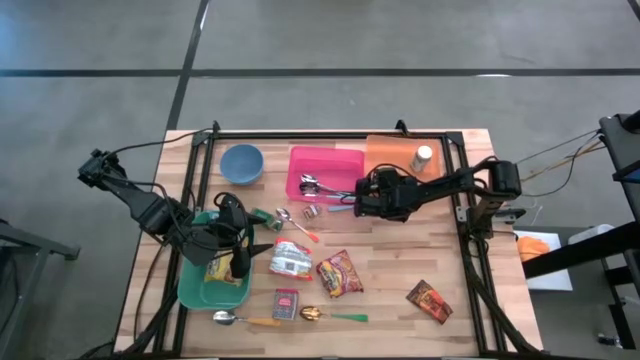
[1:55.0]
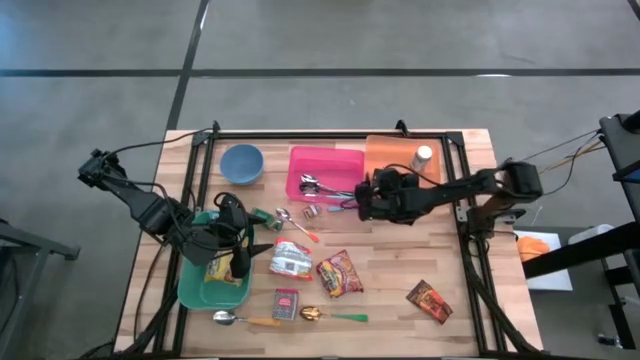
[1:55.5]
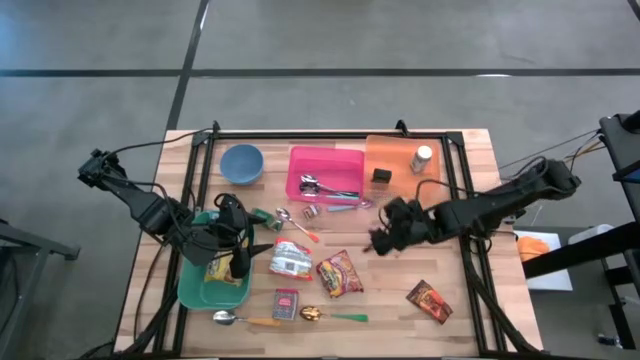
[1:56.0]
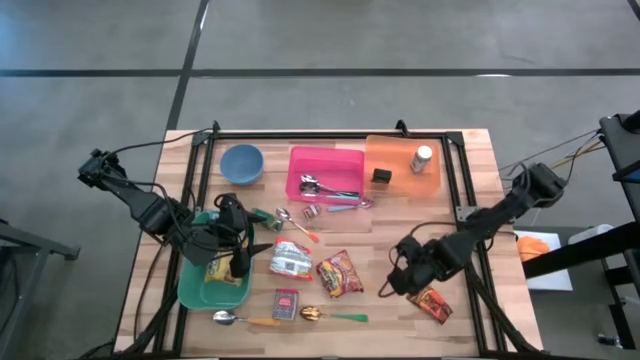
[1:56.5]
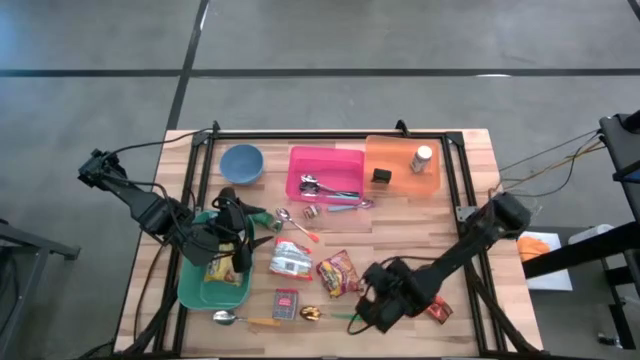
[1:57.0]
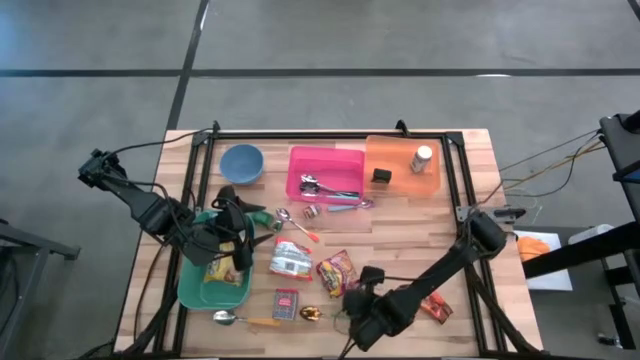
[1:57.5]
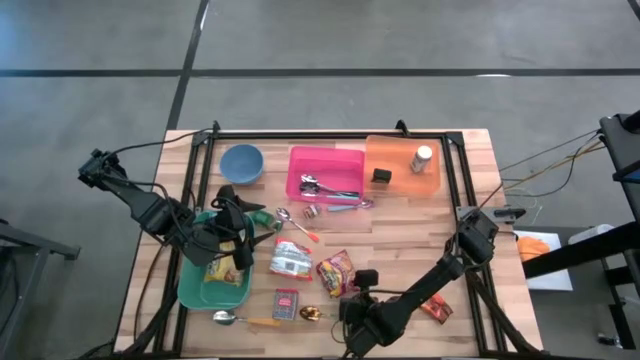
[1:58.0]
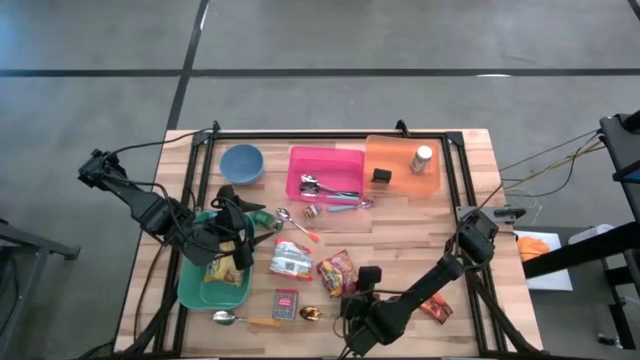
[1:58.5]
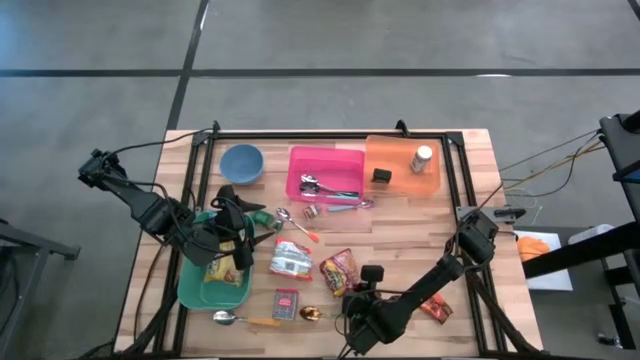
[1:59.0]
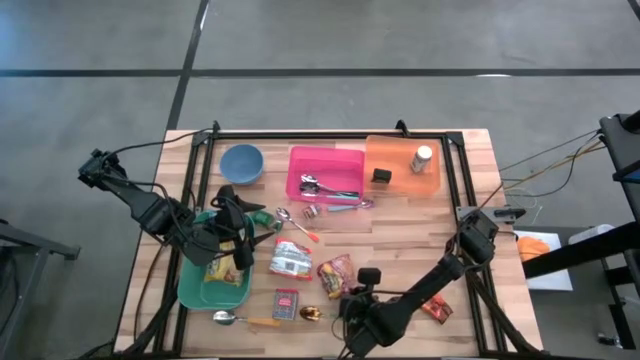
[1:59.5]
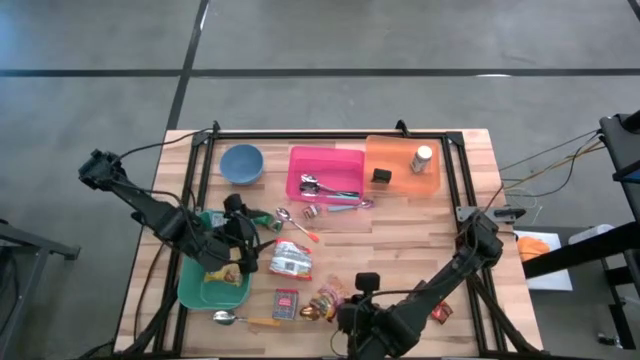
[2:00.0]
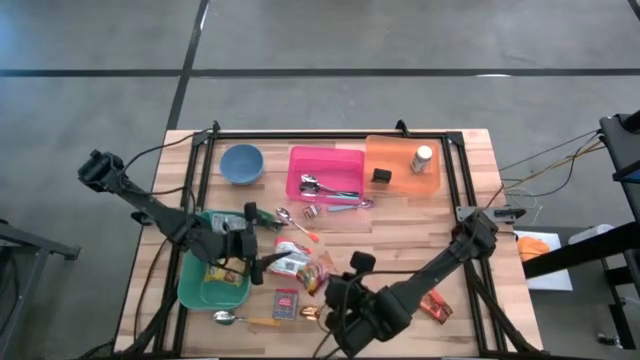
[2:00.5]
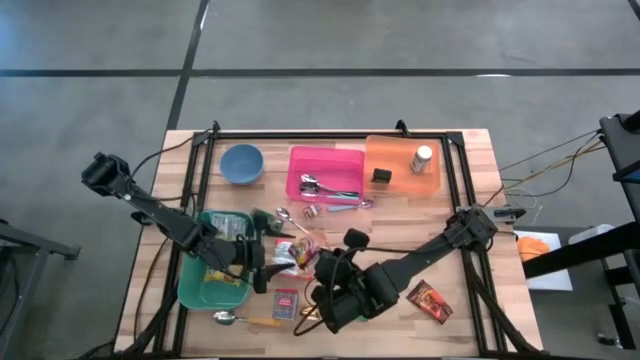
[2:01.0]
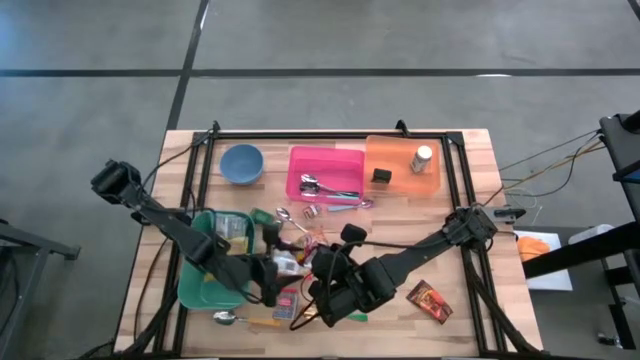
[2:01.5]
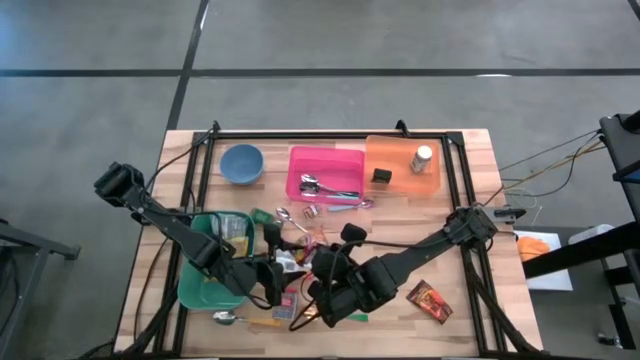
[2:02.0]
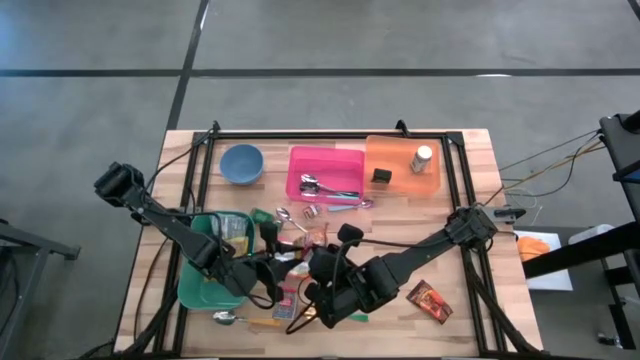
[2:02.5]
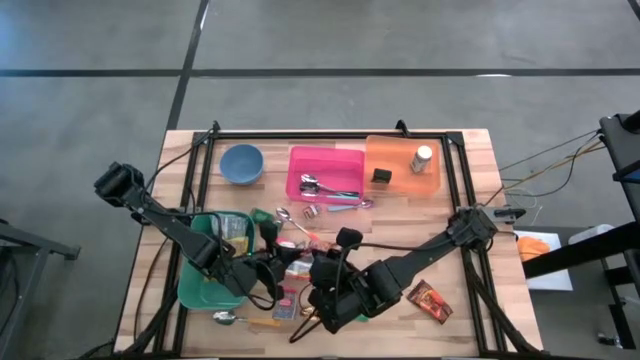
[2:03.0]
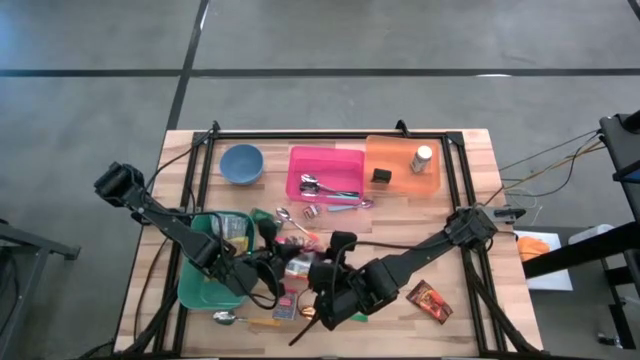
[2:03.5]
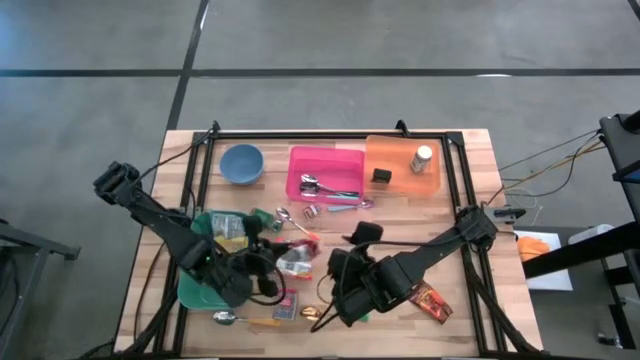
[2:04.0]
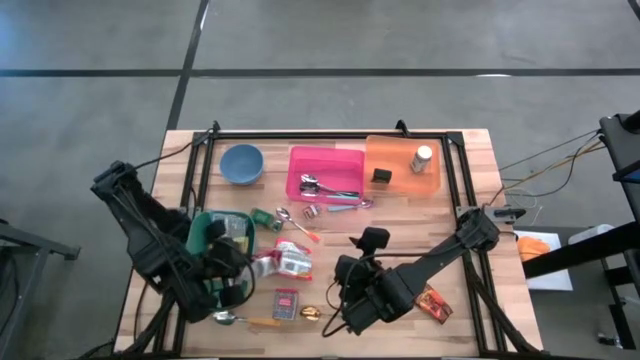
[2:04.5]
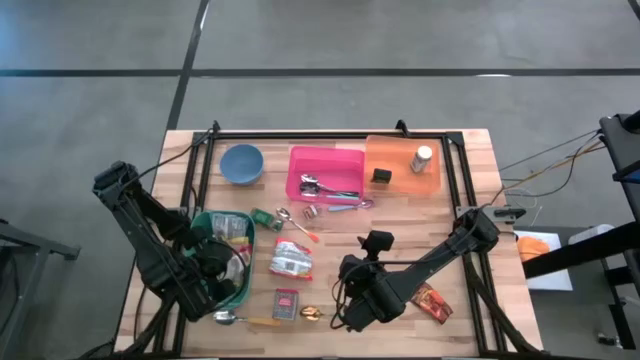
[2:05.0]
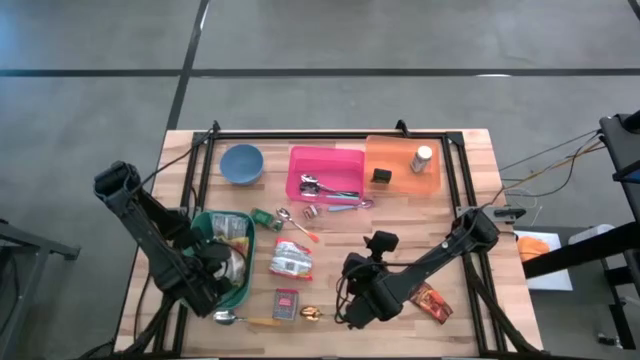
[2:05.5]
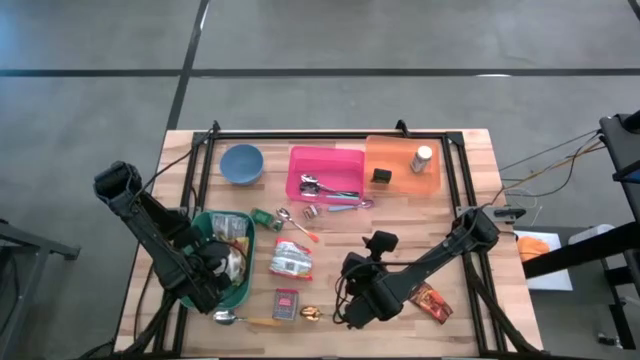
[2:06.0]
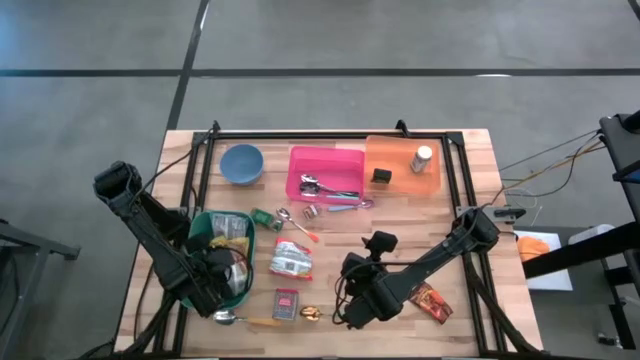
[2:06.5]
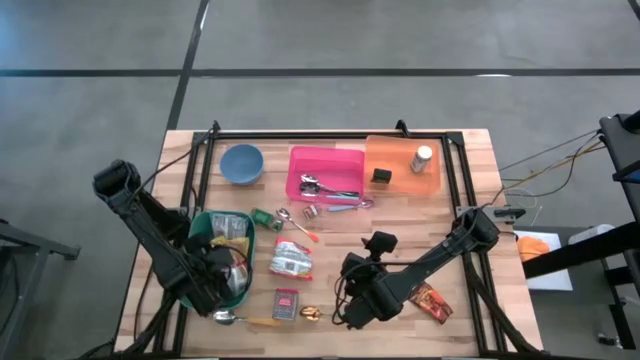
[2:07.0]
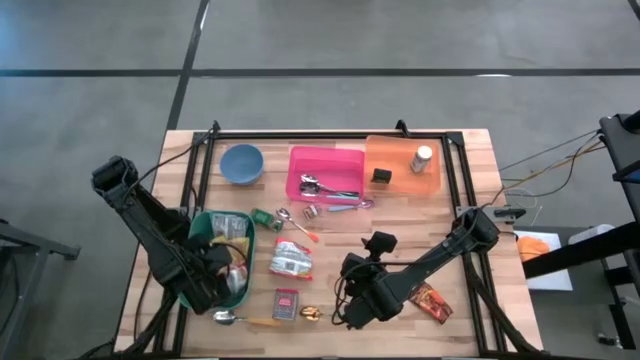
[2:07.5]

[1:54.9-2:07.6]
Put the red noodle pack into the green bin

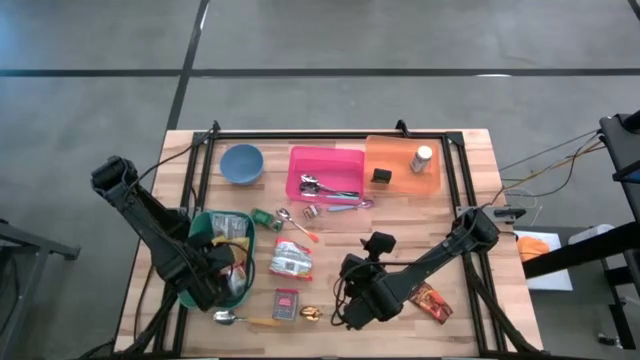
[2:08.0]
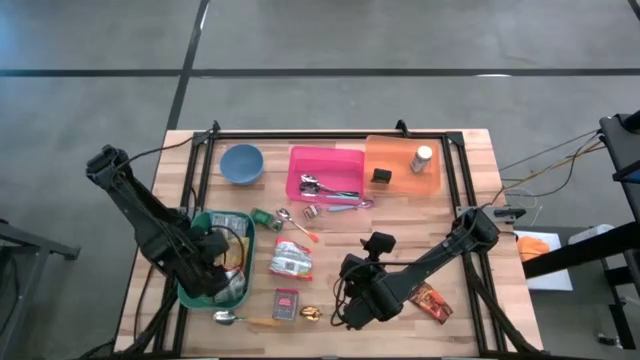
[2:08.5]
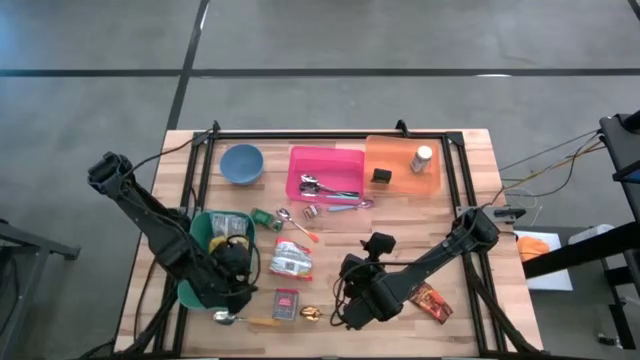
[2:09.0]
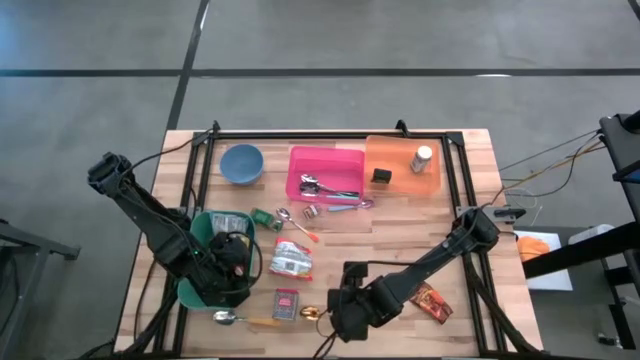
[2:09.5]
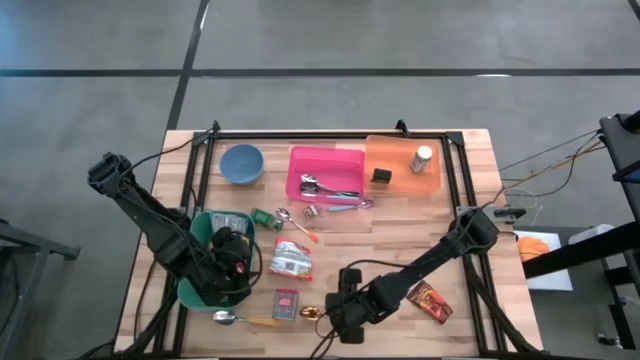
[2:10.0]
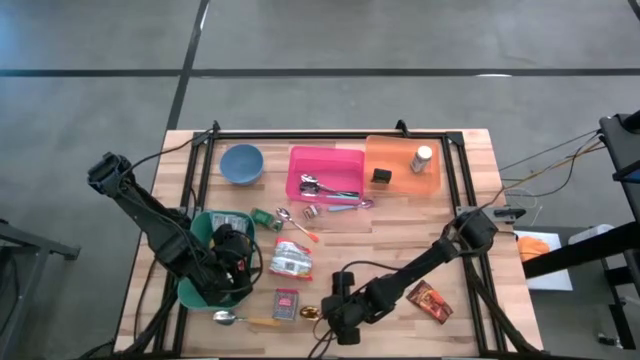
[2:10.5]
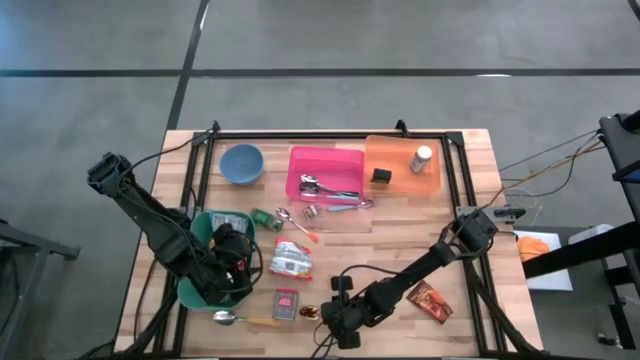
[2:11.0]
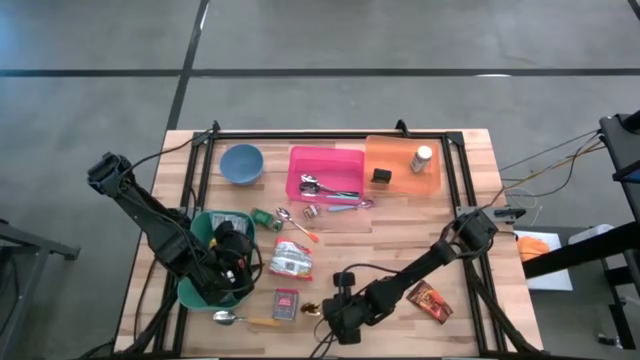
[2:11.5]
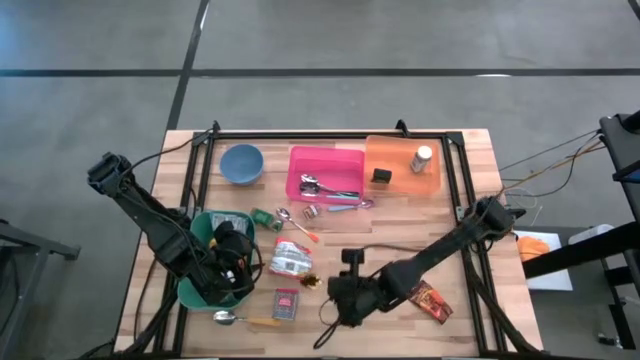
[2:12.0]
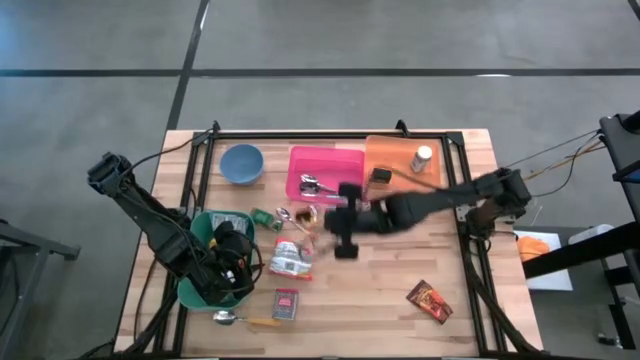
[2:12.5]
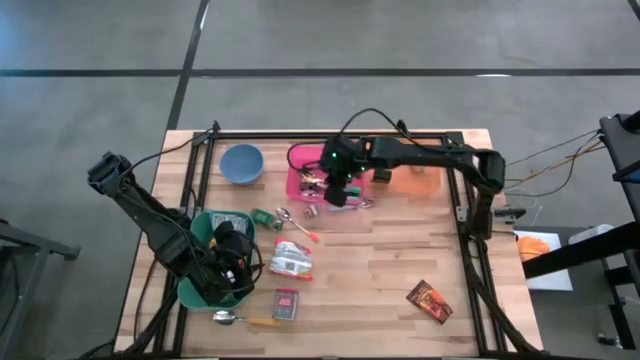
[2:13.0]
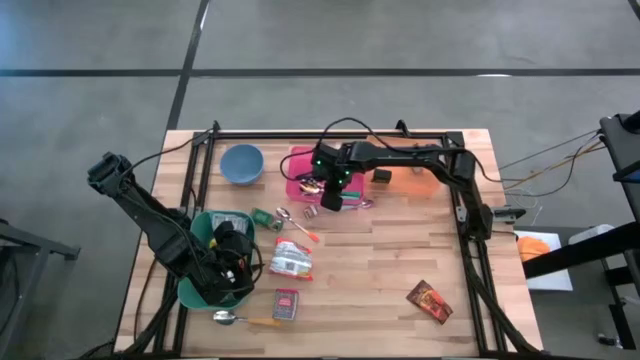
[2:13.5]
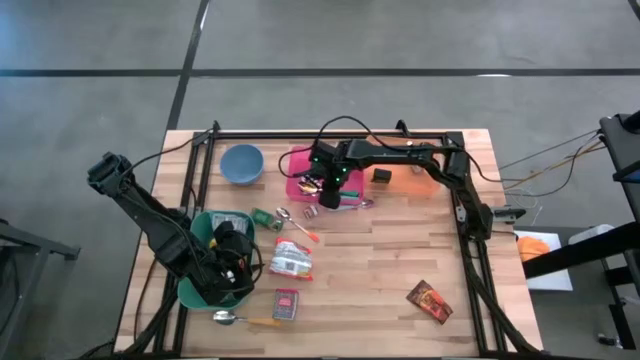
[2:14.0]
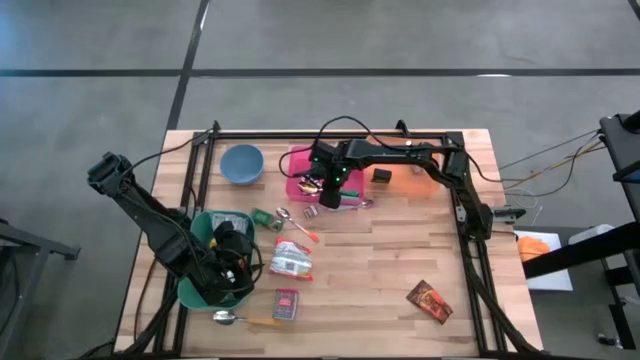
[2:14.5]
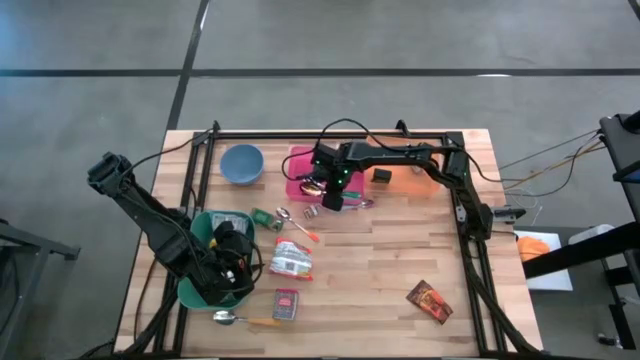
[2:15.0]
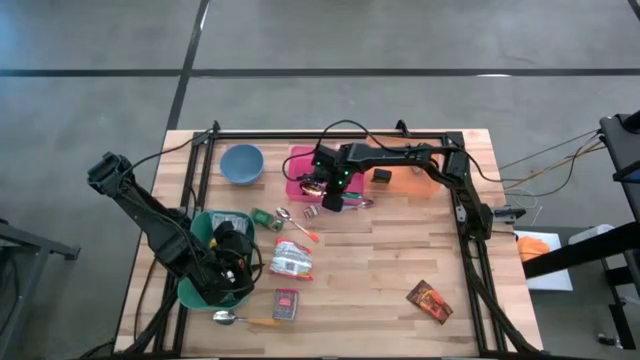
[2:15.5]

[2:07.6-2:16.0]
Put the green spoon into the pink bin
